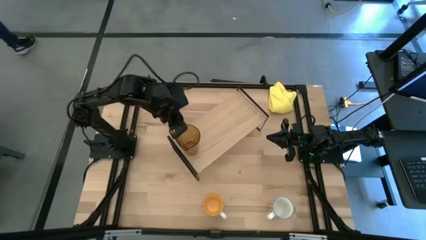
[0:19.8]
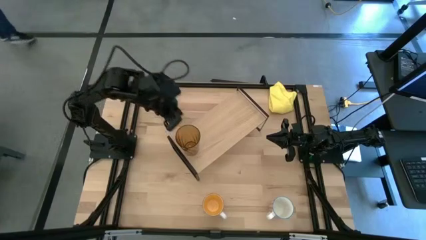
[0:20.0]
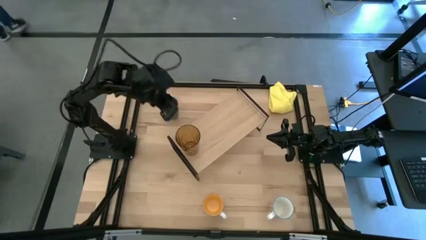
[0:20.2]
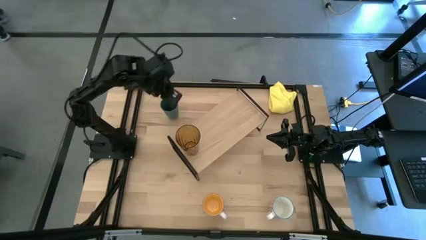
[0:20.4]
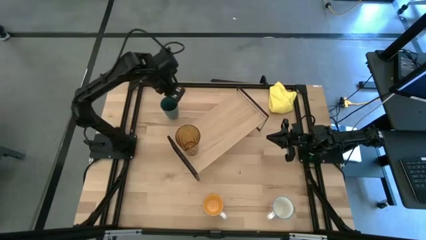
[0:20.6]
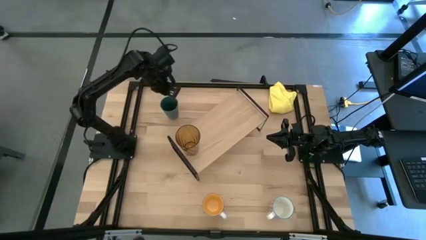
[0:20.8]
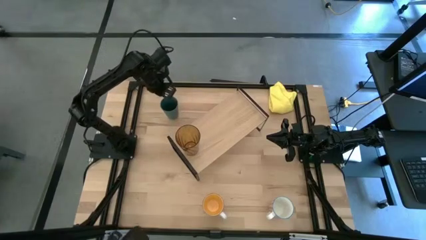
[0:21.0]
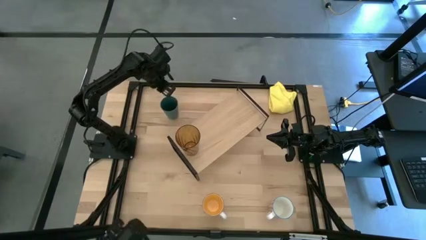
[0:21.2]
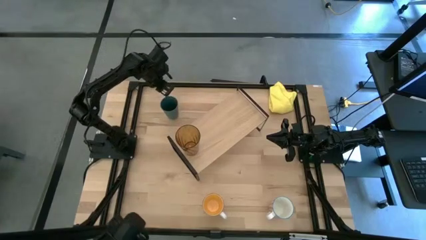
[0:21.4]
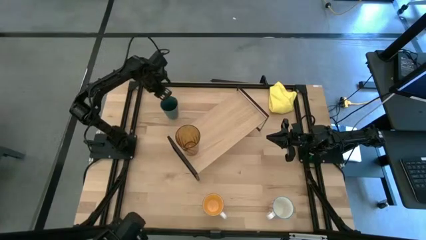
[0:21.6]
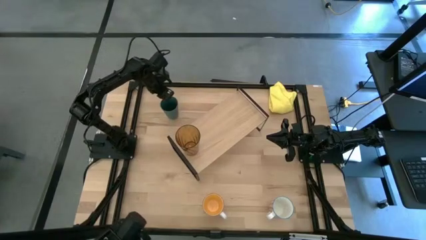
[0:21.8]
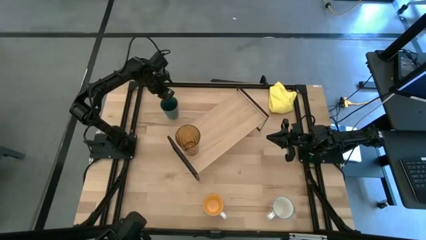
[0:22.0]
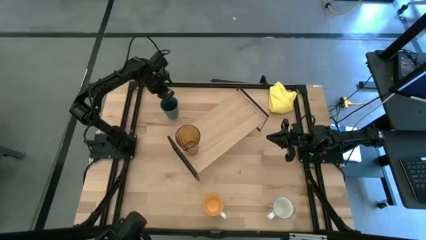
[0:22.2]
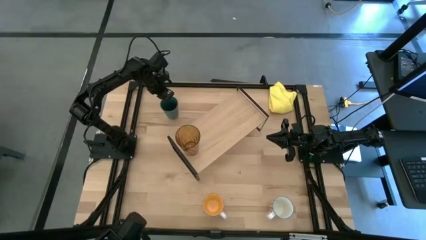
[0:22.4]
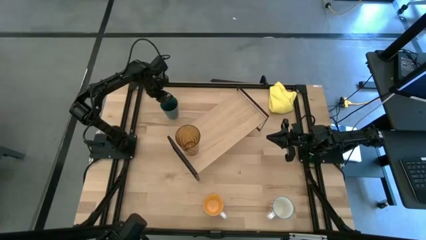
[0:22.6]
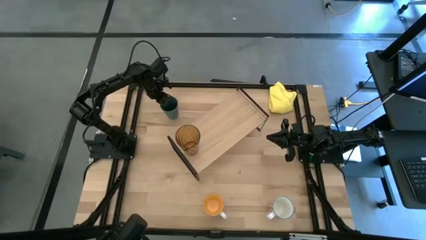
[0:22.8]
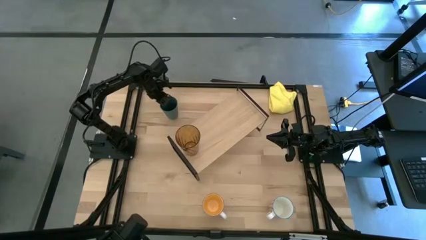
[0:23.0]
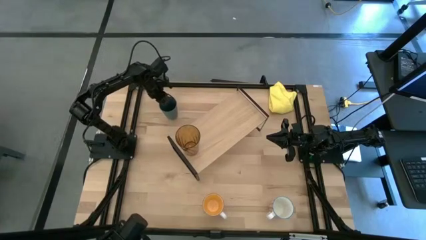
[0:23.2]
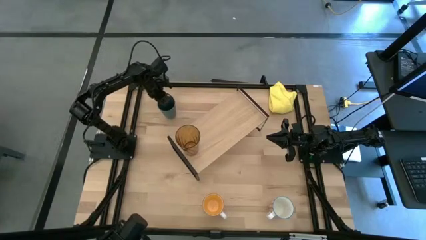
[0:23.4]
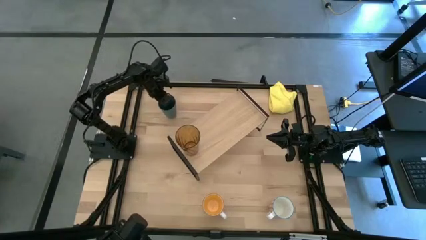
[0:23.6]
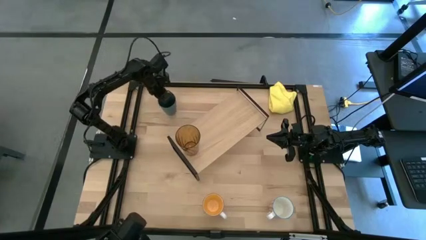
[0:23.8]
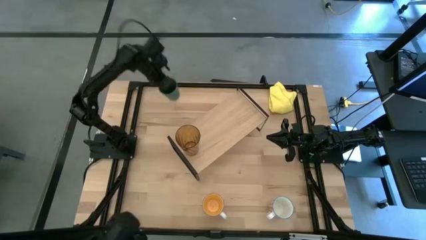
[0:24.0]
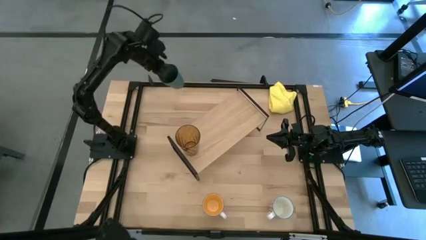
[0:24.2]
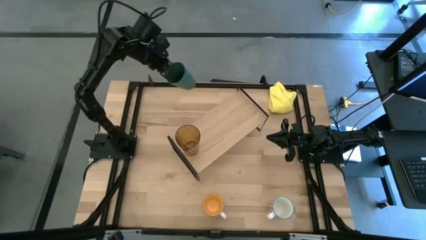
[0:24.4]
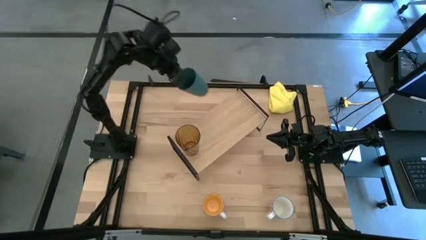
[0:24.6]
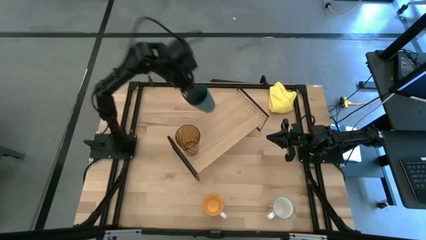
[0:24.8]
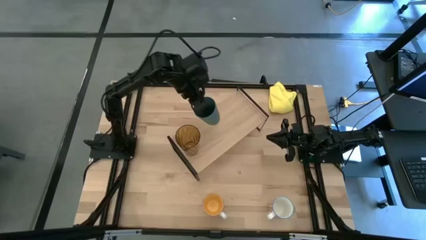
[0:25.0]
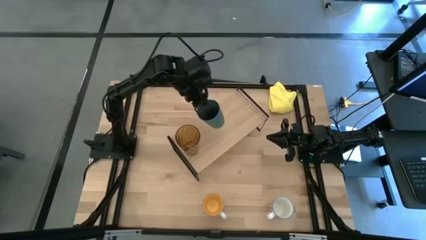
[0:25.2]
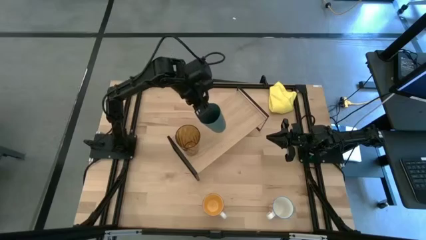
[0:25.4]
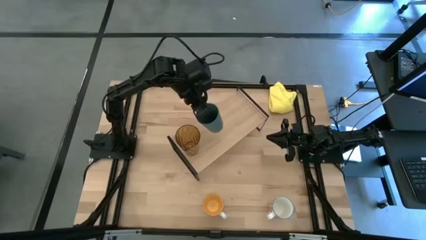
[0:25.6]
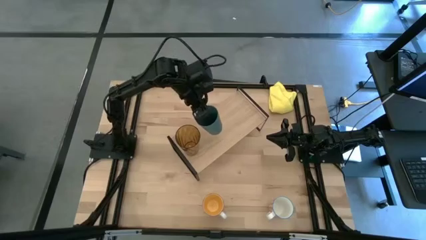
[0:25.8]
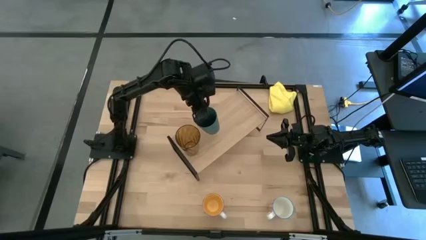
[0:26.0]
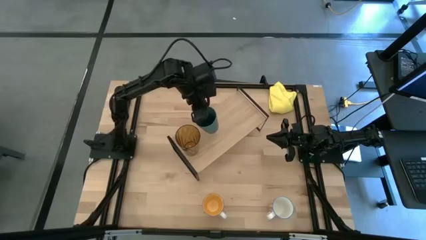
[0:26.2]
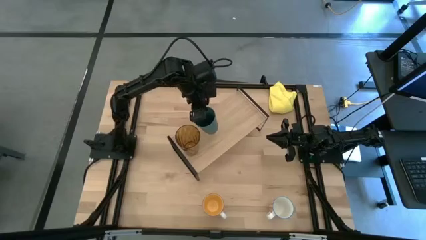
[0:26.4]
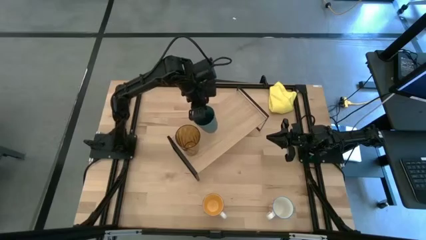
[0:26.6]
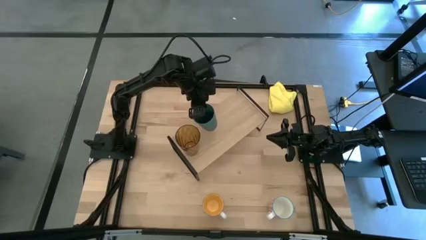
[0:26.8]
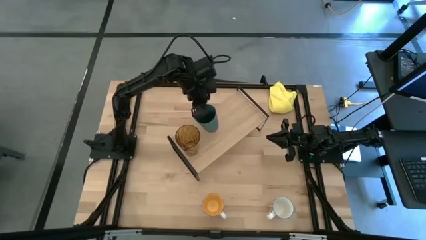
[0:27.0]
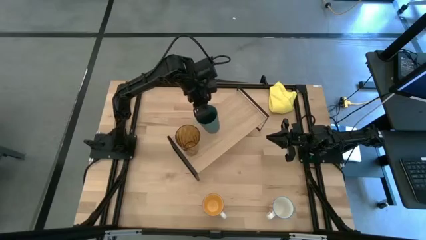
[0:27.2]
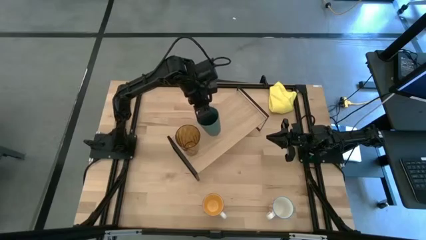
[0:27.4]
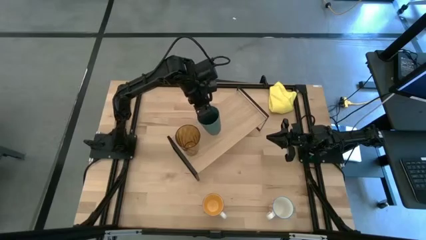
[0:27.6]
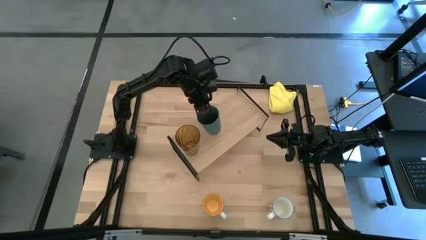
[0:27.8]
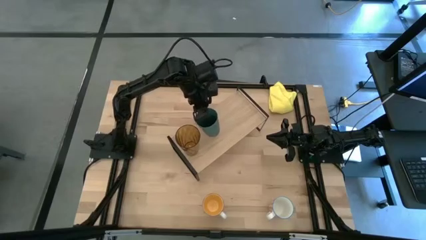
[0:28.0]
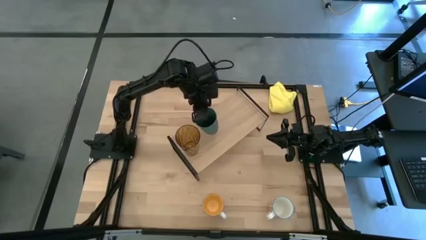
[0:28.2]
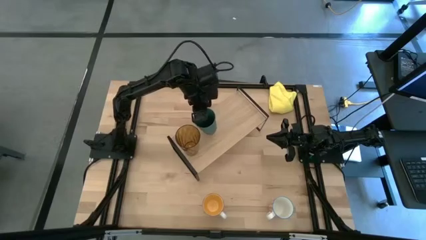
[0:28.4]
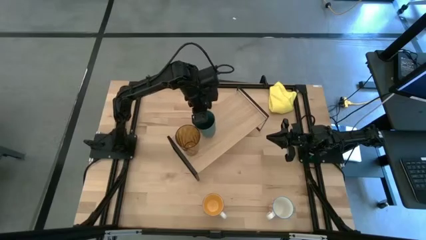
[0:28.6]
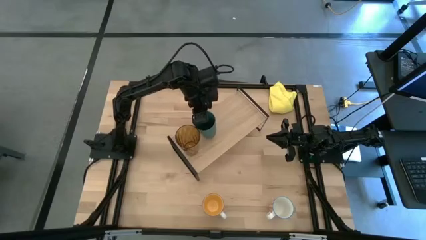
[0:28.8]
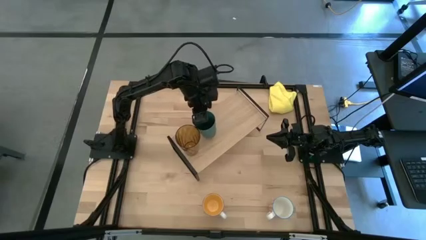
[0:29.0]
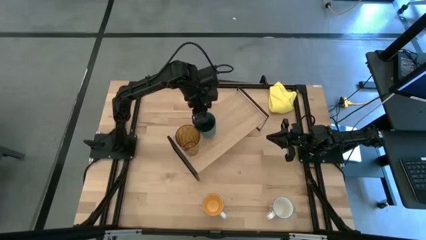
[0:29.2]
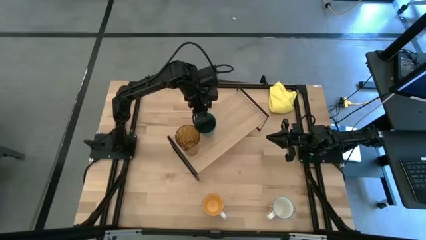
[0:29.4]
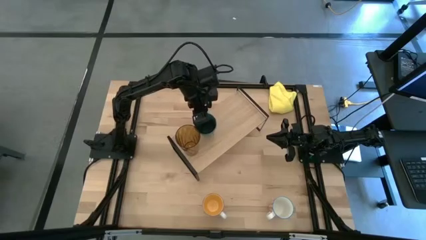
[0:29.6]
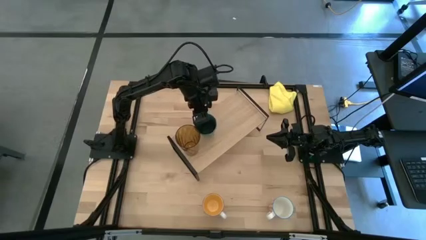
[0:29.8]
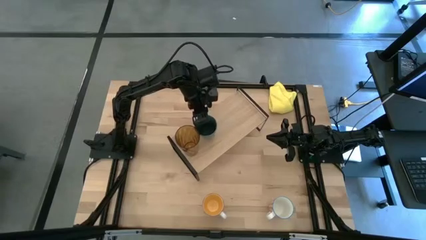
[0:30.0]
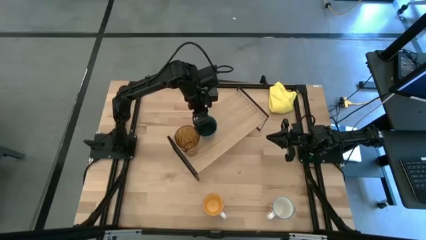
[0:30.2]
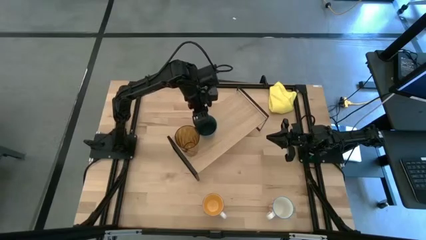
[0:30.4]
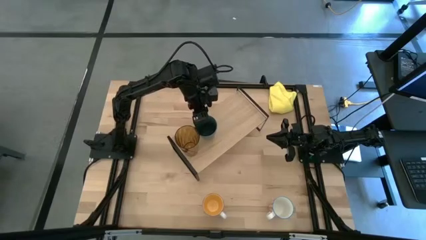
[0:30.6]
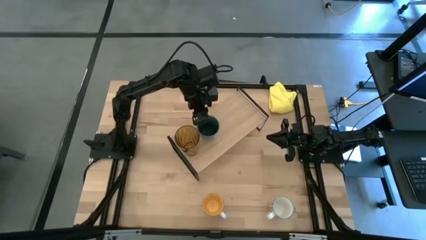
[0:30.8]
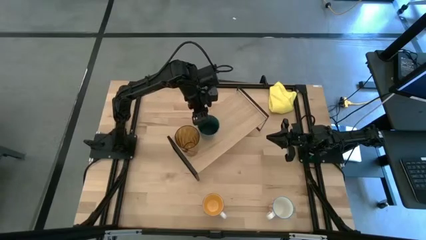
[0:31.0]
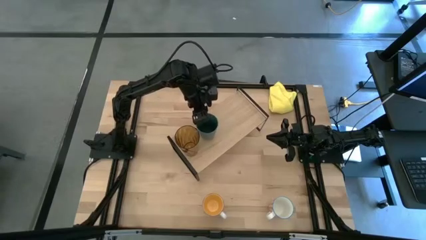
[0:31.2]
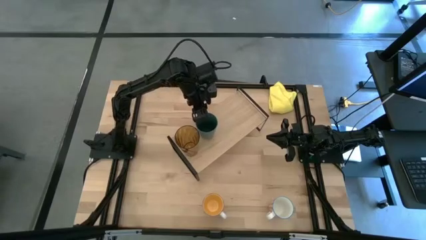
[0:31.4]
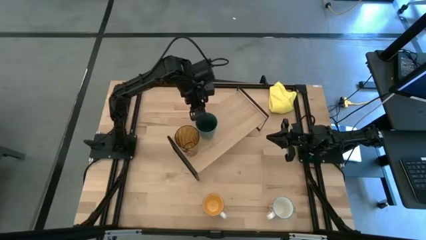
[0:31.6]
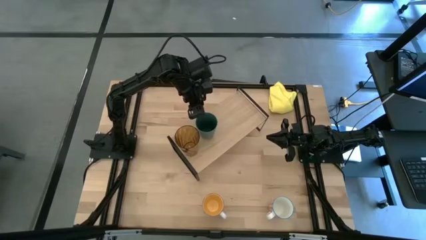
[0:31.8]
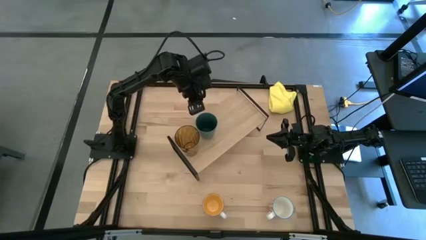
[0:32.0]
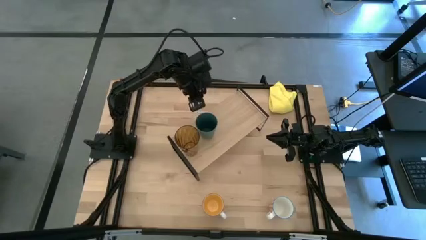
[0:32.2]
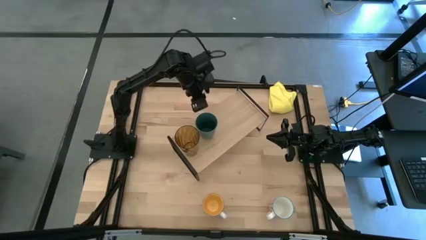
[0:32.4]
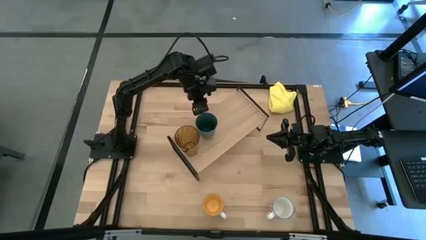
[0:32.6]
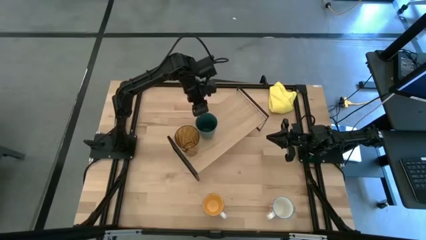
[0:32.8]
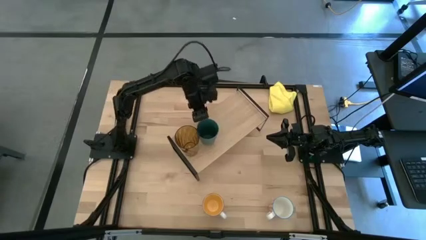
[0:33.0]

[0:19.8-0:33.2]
Task: Stack small to large cups/mugs on shelf
Put the blue cup on the shelf
